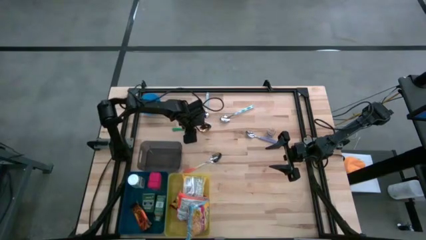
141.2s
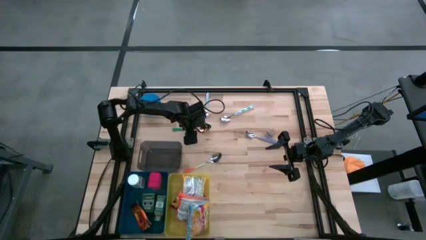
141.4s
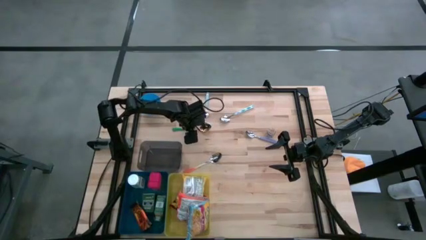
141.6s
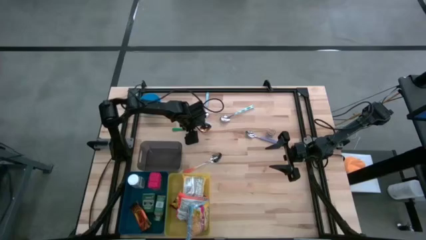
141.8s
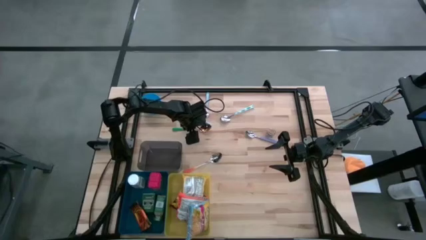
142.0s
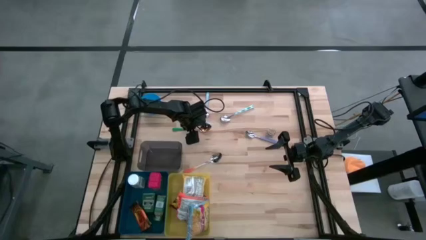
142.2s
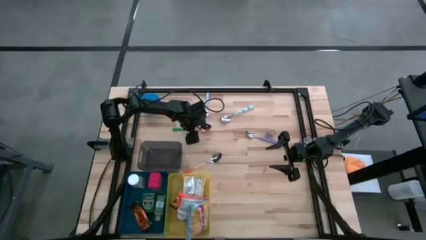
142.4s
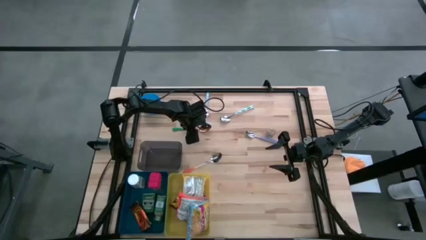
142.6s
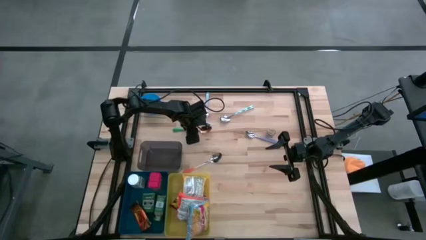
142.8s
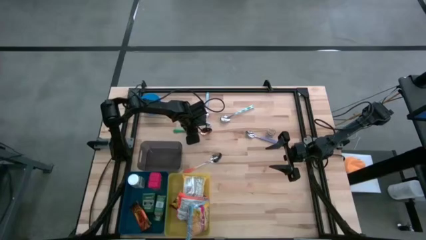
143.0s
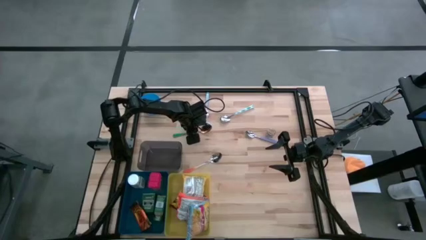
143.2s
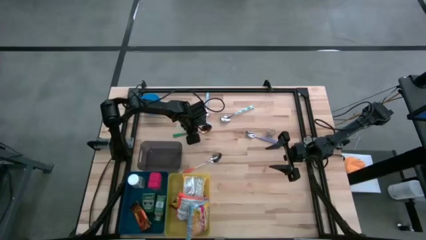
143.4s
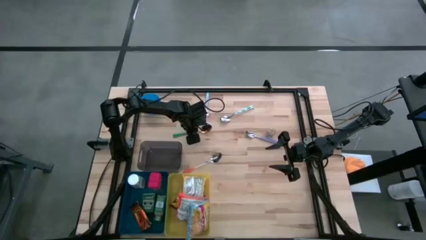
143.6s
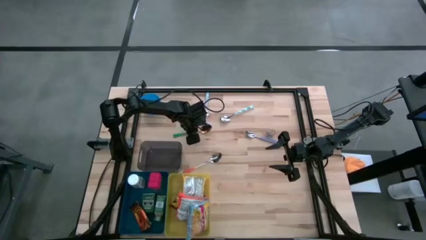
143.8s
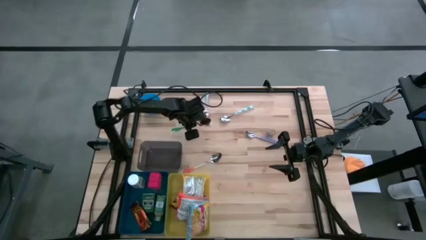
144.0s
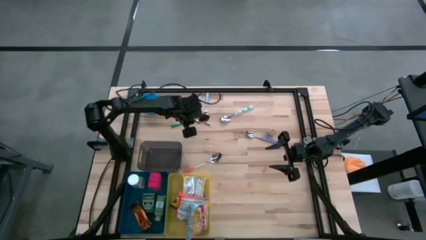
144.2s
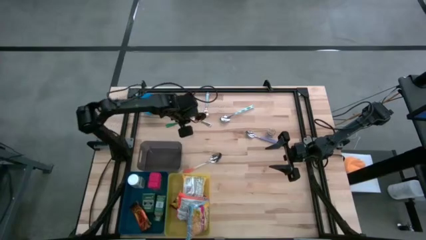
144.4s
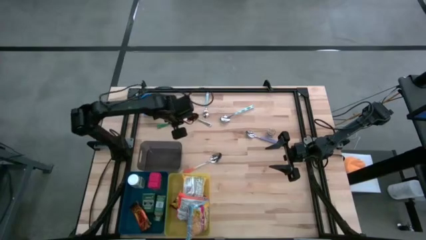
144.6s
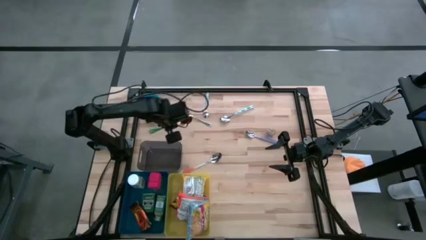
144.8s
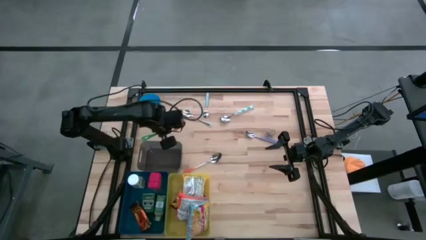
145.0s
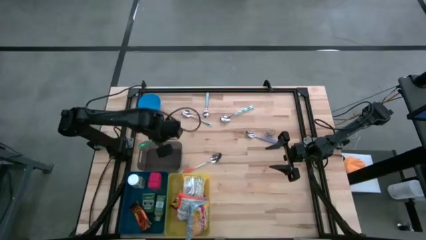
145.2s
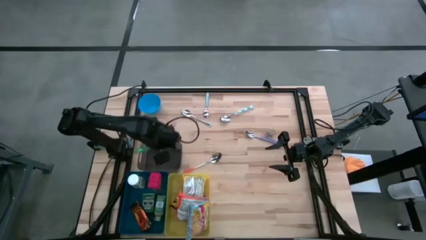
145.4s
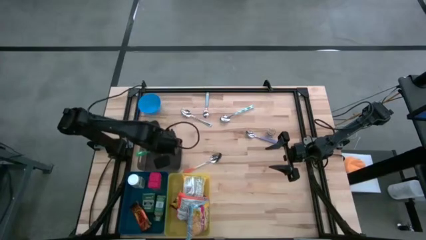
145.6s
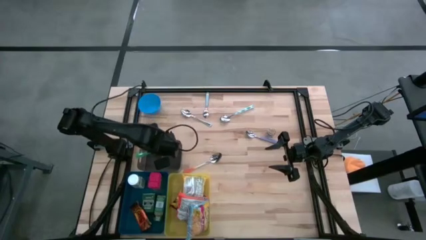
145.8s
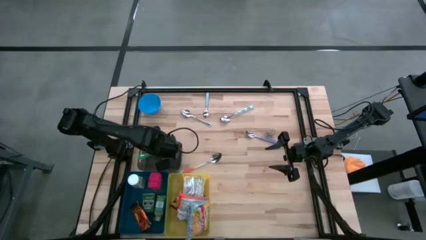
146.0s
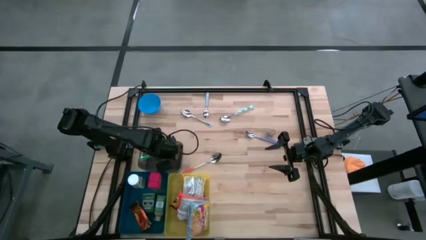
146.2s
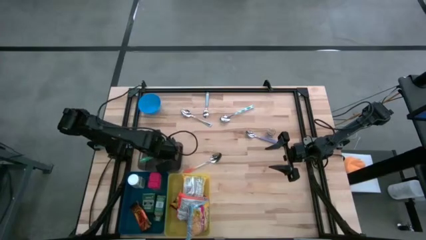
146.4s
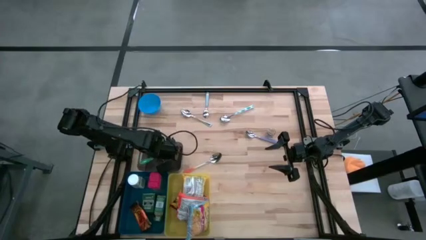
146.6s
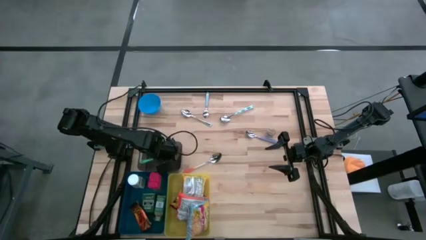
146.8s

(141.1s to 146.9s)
Put the green spoon into the gray bin

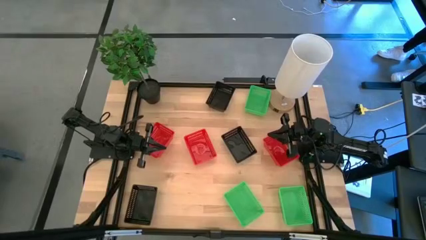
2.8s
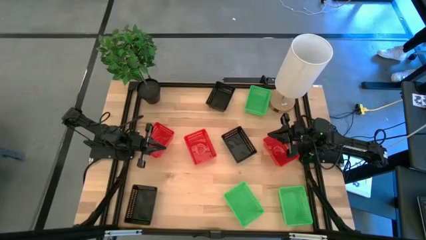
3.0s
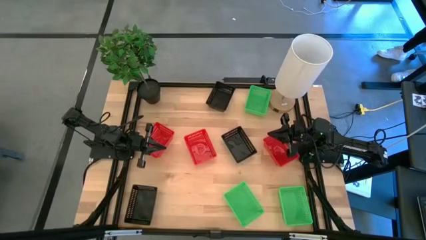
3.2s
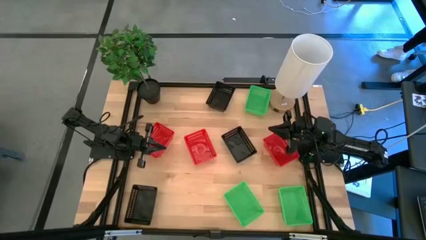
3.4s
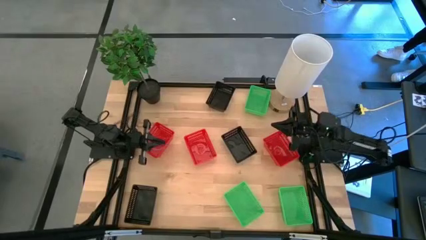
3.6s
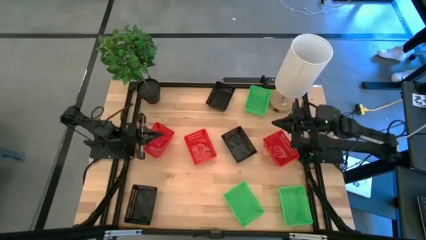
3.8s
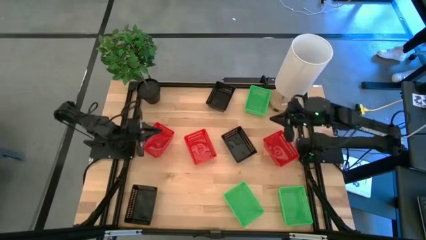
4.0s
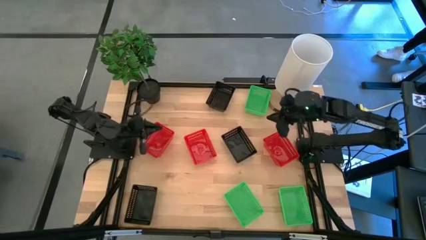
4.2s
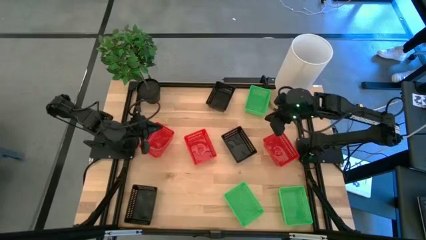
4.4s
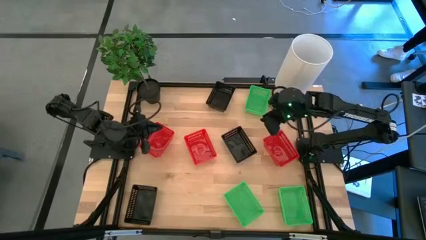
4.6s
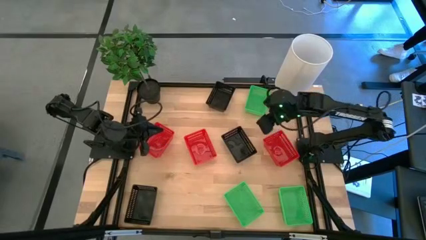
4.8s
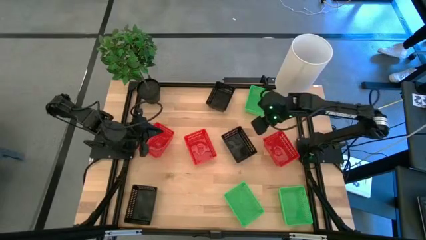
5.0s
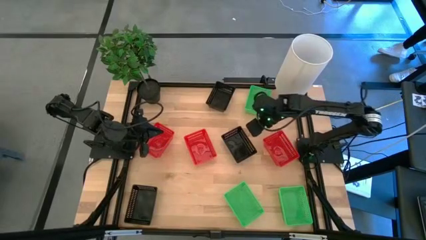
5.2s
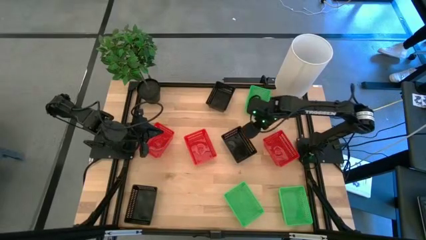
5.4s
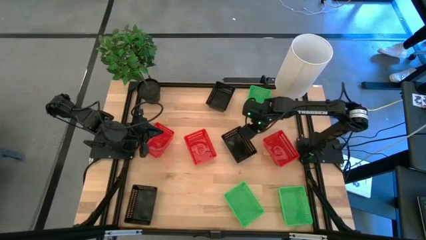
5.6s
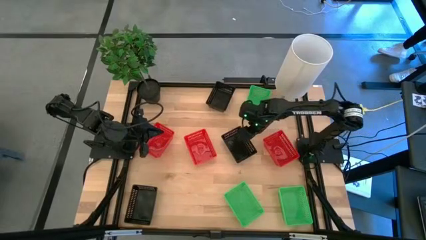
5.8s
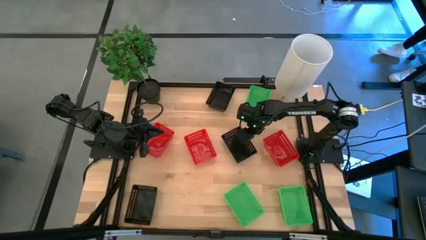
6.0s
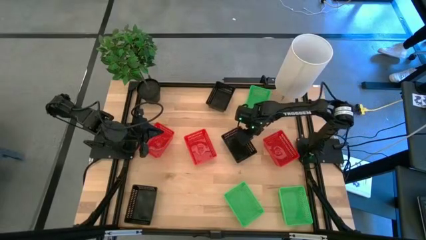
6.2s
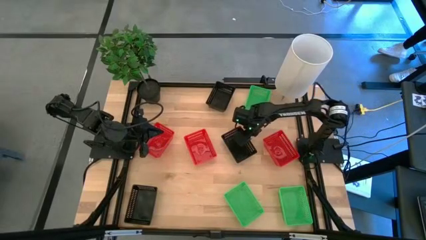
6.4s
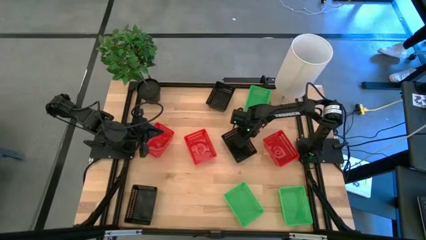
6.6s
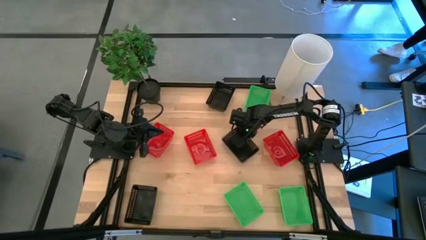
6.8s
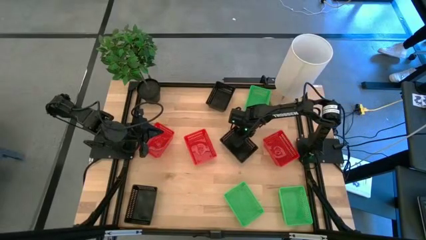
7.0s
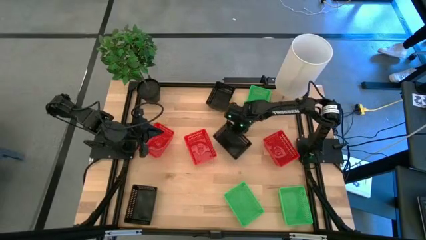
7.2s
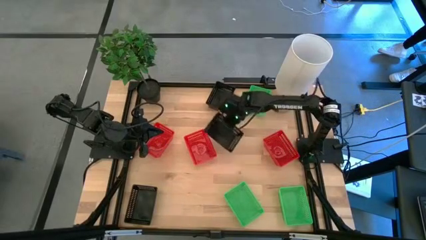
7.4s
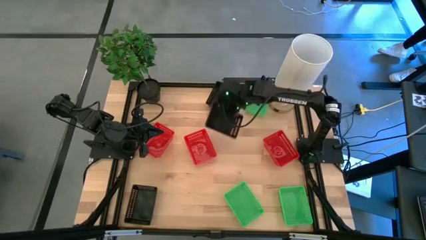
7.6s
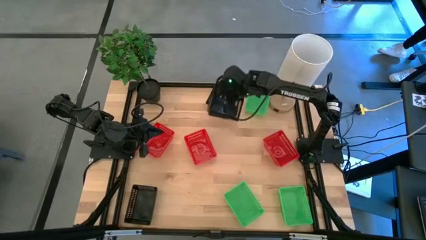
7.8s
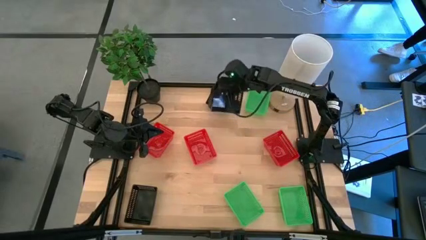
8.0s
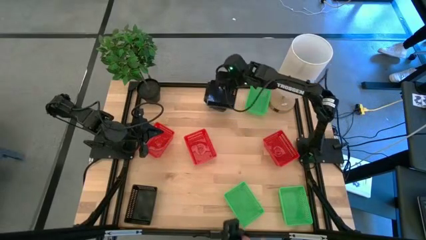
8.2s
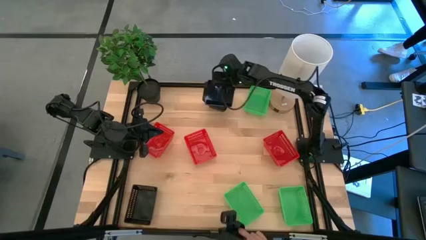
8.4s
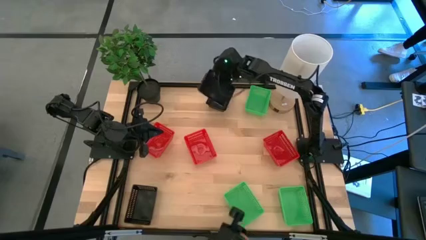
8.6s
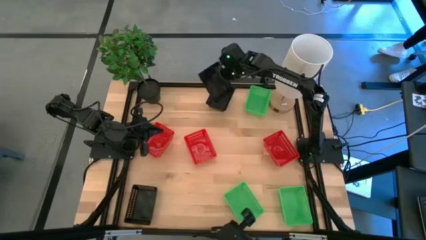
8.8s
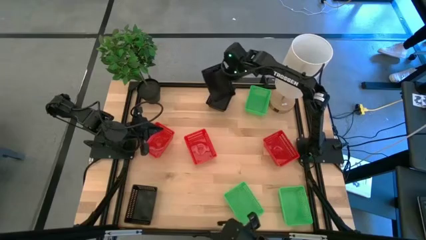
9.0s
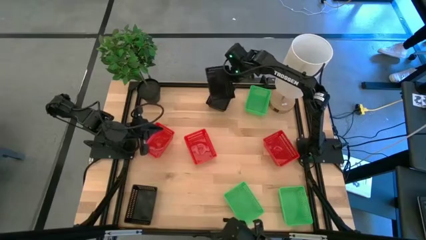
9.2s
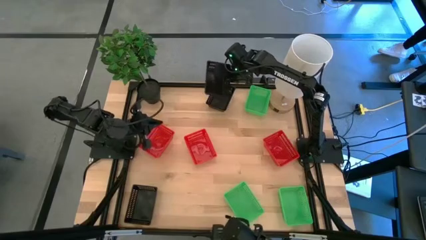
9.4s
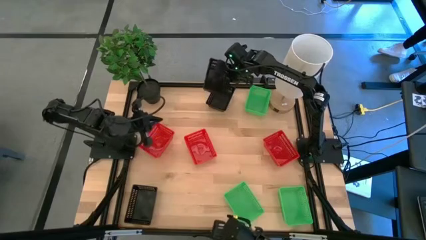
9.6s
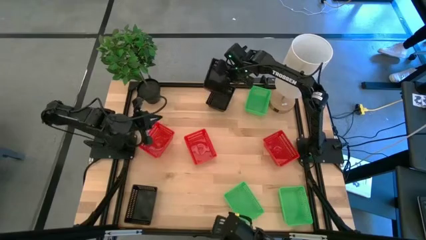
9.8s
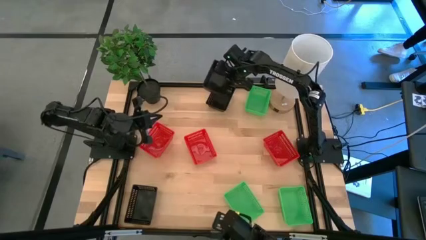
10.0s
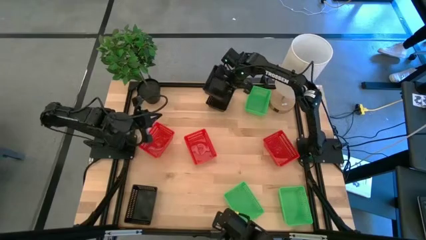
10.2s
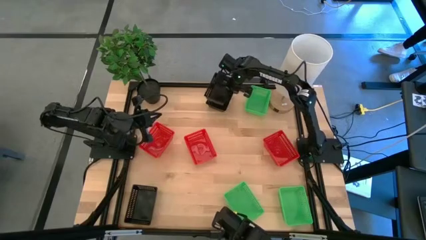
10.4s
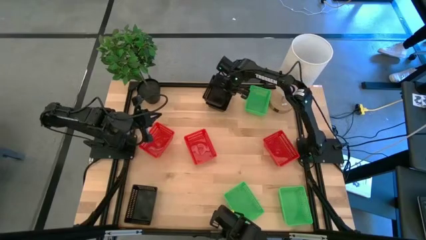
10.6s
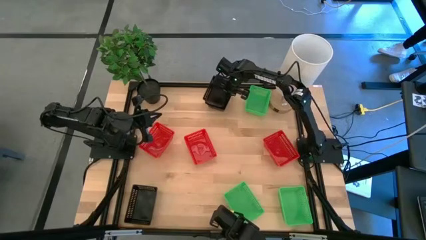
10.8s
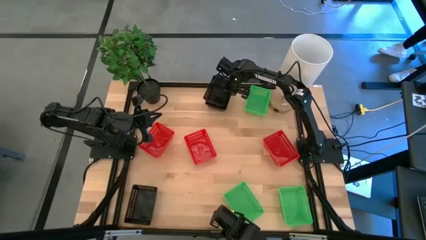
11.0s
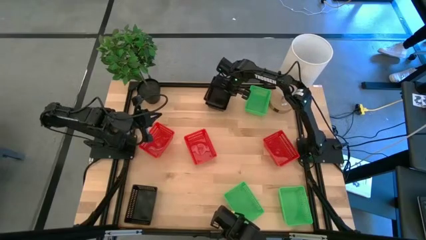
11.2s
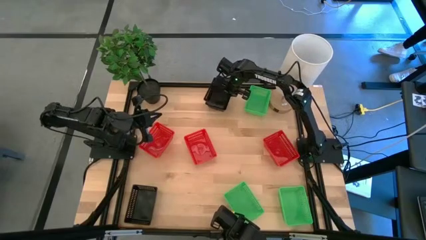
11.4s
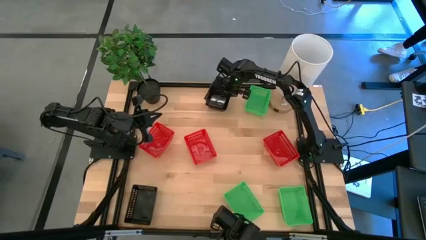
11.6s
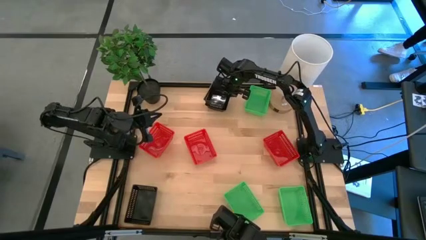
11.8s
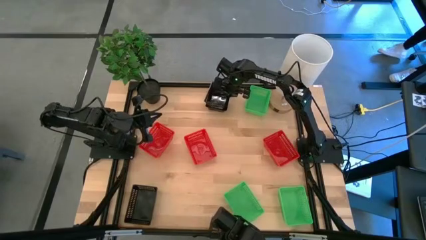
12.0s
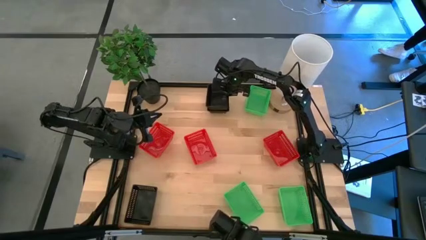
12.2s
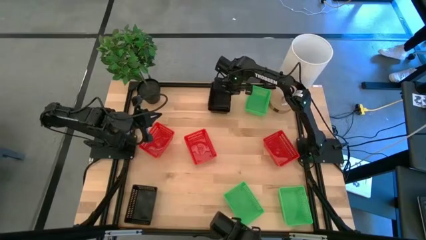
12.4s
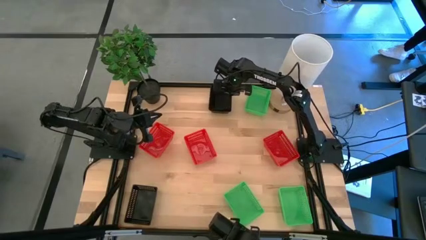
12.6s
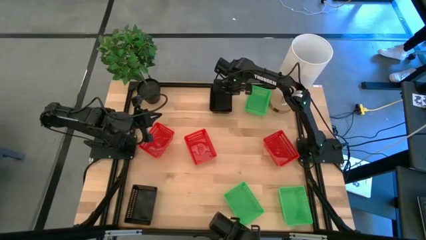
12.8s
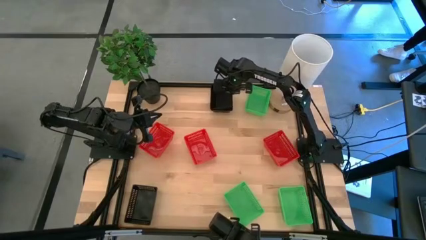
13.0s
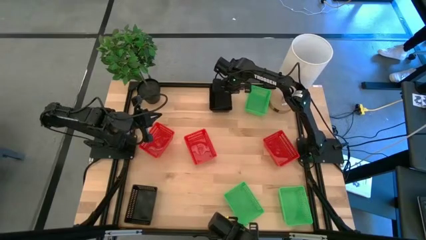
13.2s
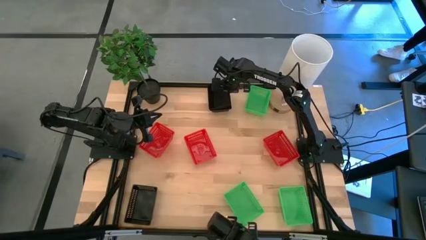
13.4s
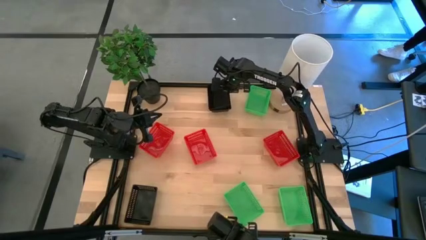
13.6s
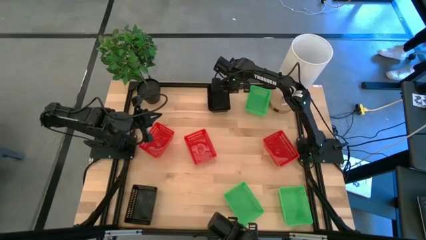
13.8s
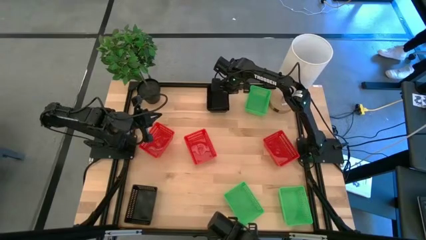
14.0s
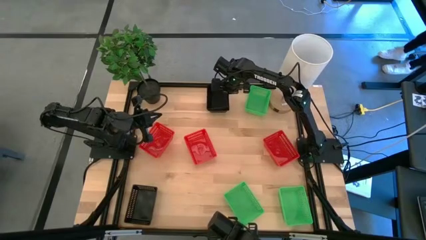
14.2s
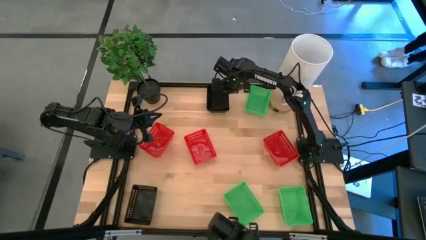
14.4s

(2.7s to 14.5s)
Stack the middle black bin on the top black bin
